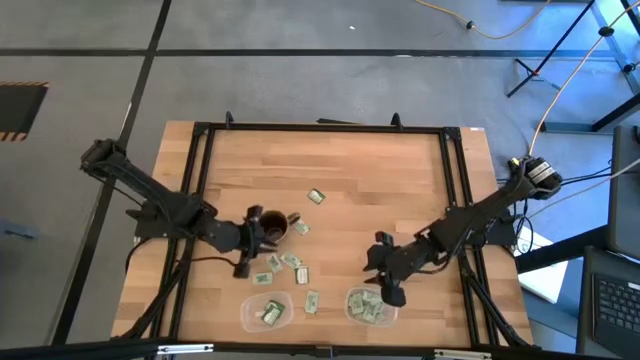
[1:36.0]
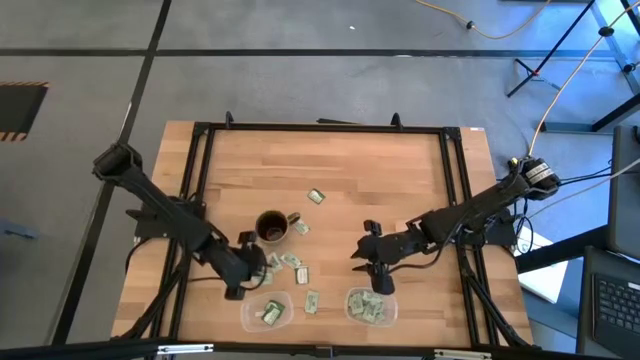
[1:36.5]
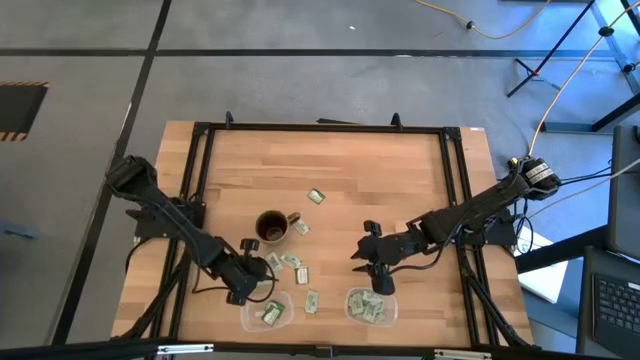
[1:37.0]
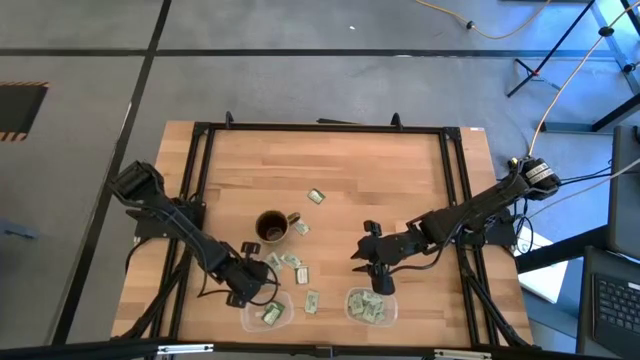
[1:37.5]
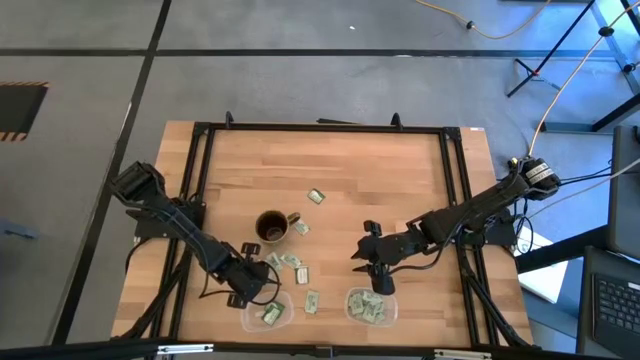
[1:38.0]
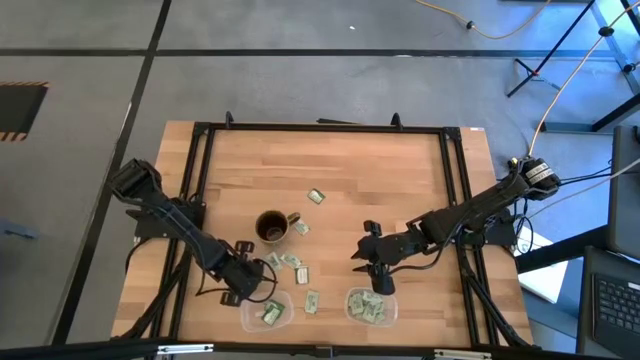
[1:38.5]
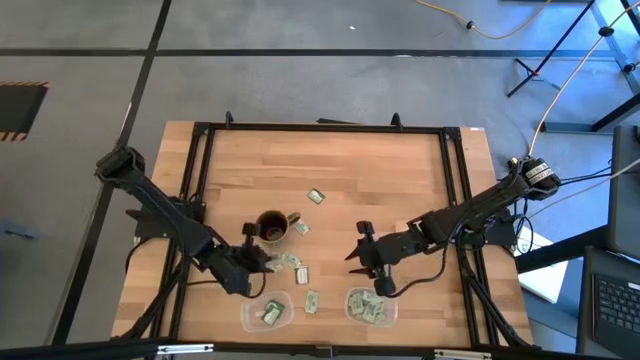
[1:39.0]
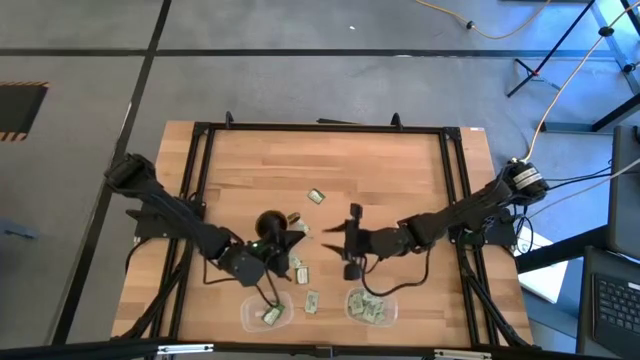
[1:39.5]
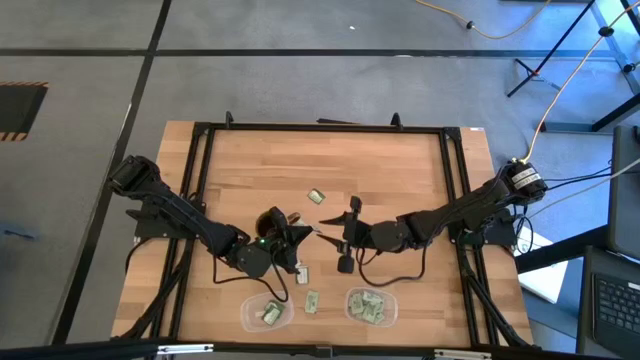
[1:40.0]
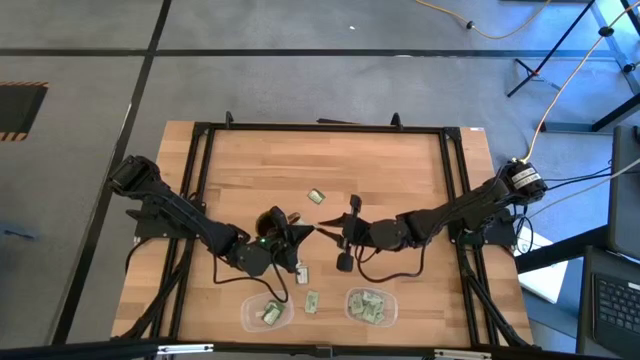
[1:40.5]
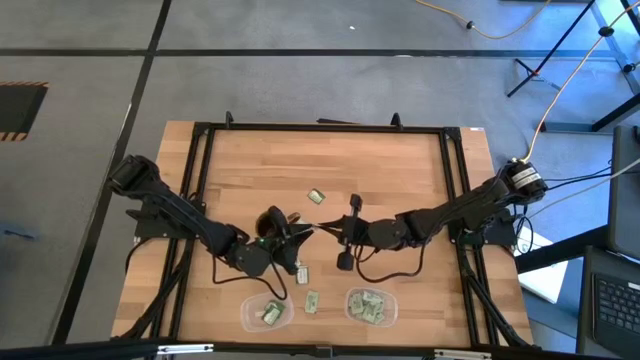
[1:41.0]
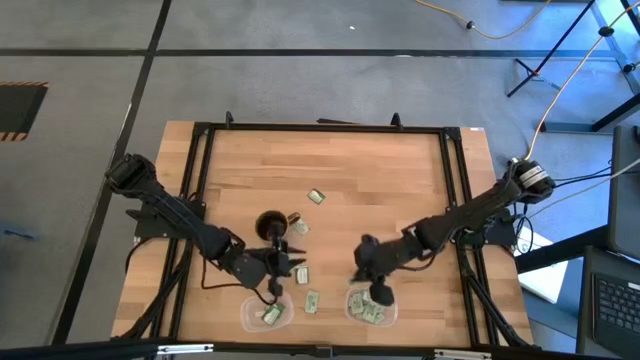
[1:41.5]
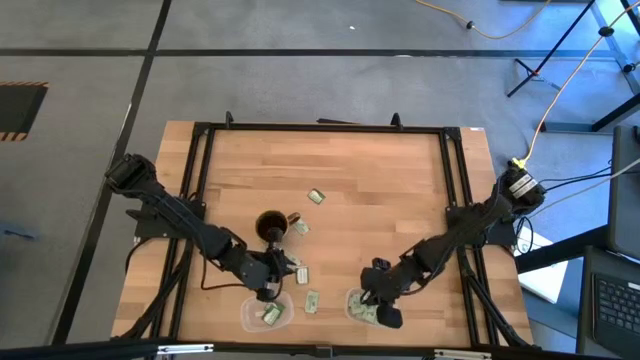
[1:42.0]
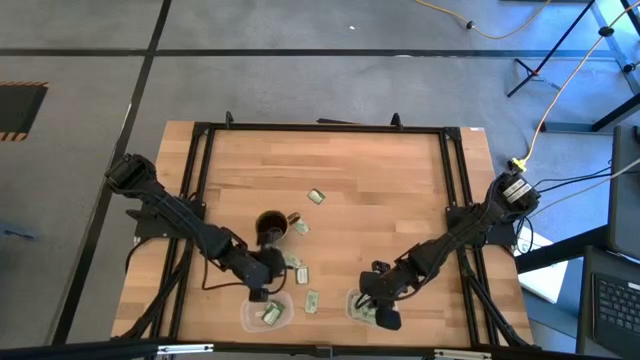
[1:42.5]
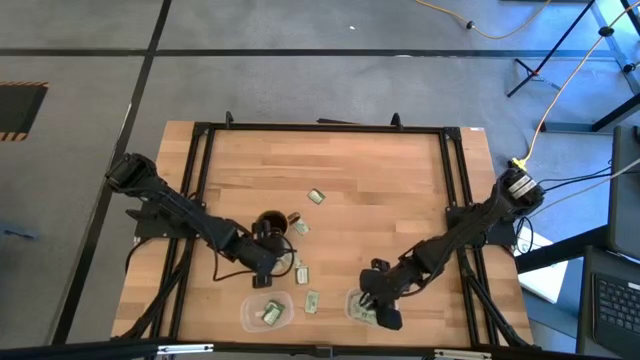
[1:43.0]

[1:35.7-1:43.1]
Task: Pick and place items into bin
Put the white stevia packet into the right transparent bin

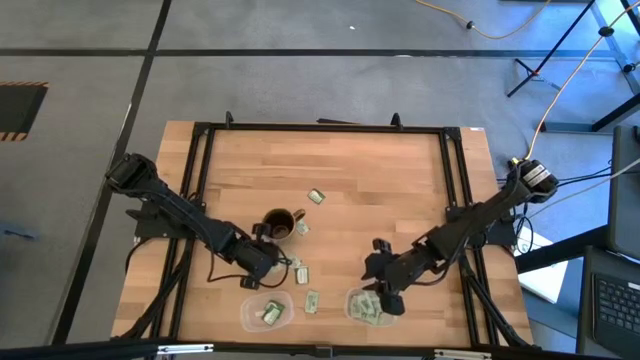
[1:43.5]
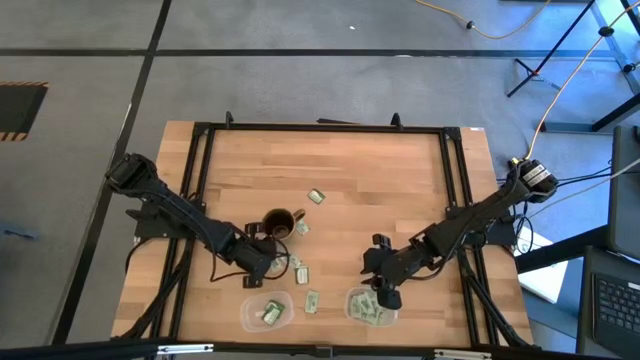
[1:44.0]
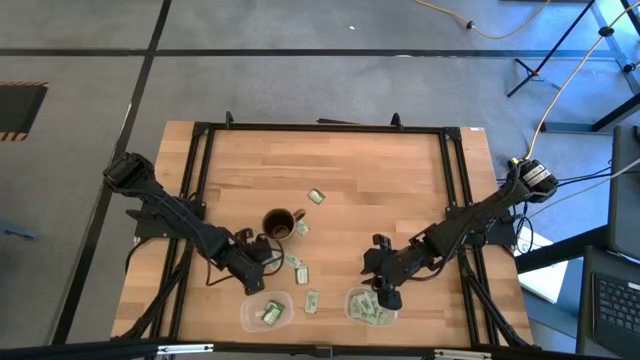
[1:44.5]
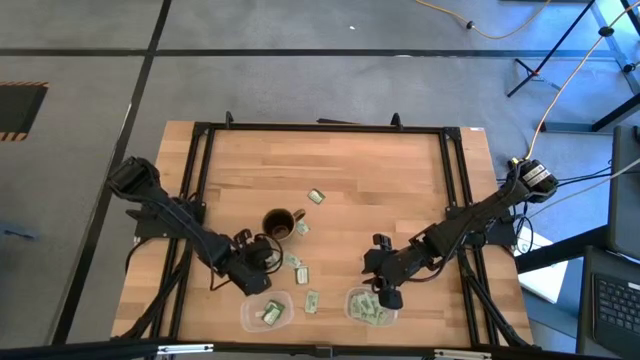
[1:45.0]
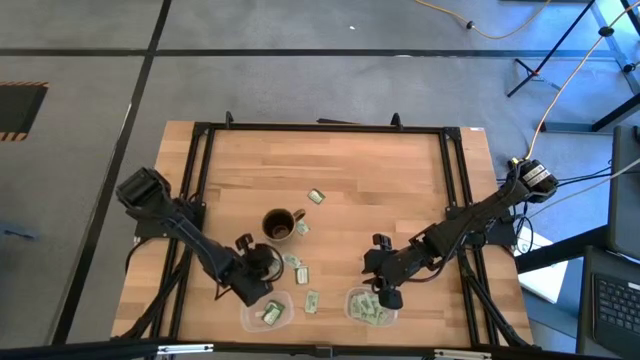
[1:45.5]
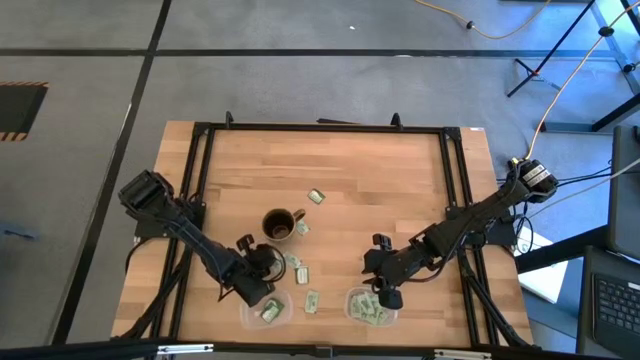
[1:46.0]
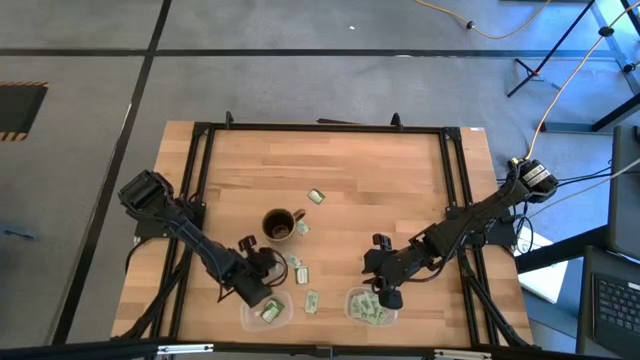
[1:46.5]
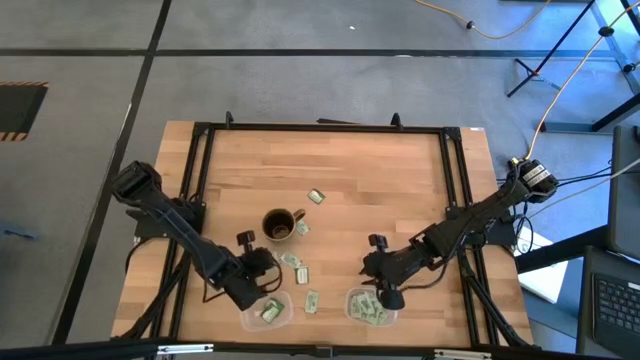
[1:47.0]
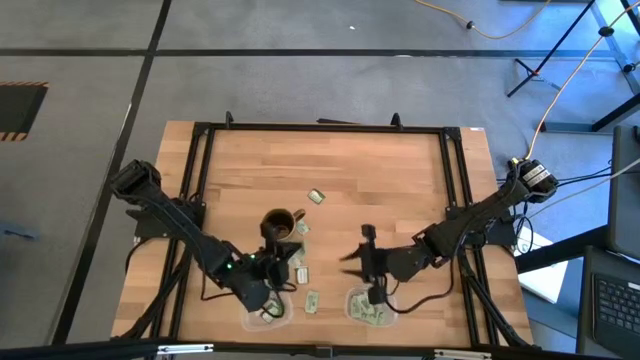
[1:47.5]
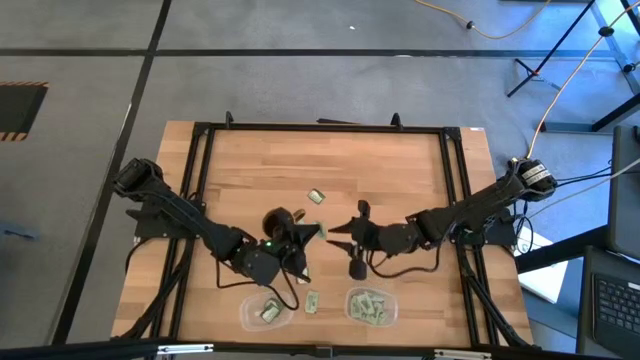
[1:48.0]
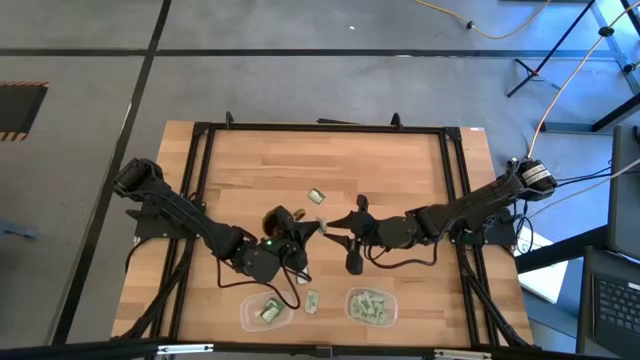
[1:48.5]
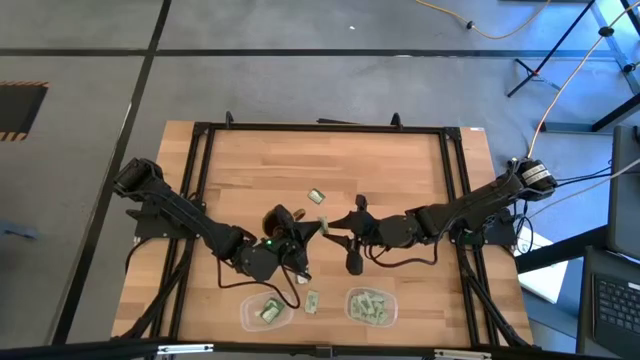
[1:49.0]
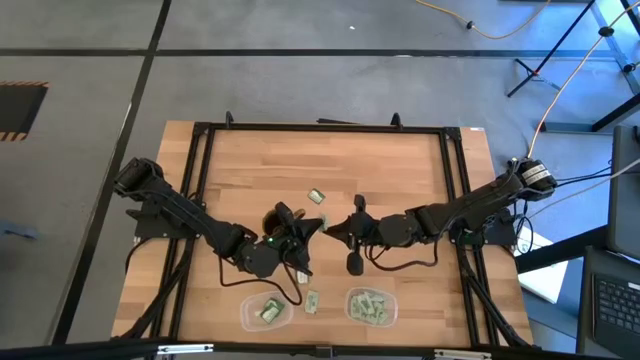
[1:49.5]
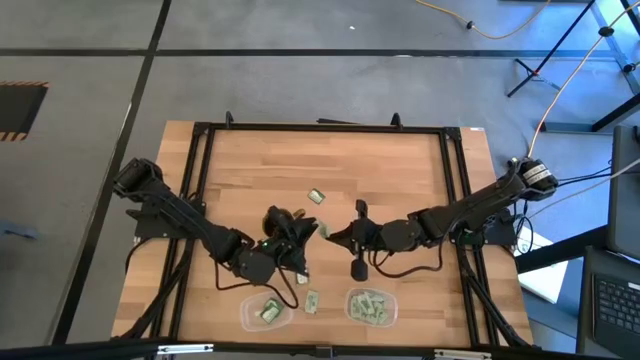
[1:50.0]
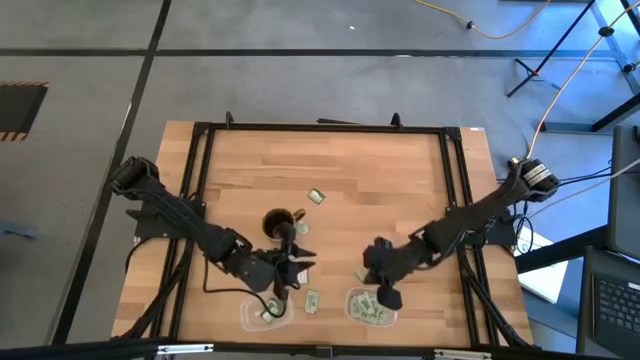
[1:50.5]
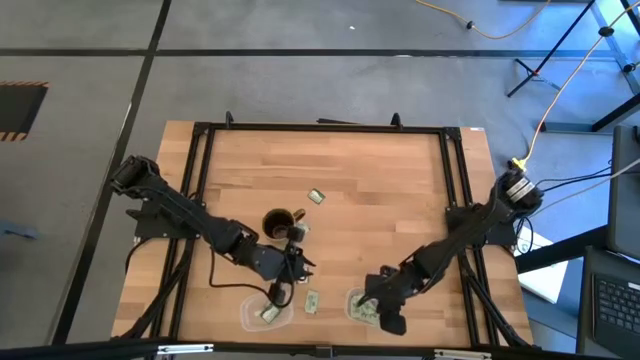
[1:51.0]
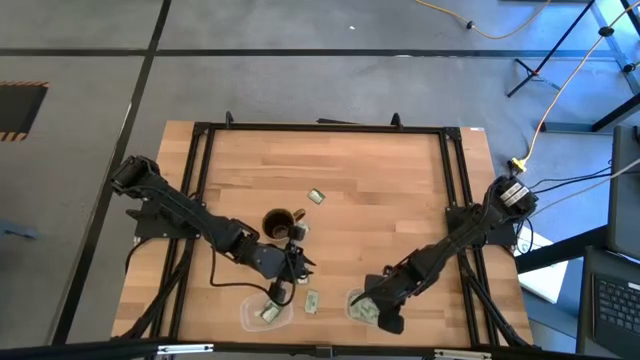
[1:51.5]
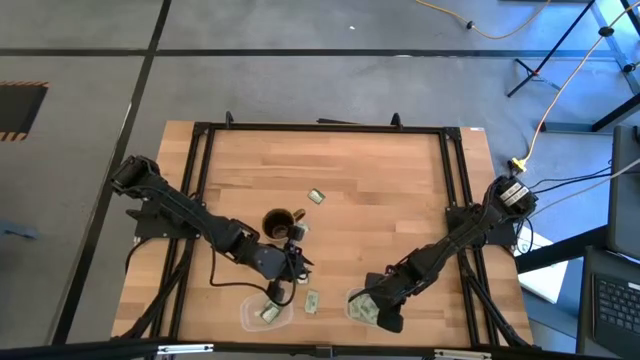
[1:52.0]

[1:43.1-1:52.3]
Put the white stevia packet into the right transparent bin

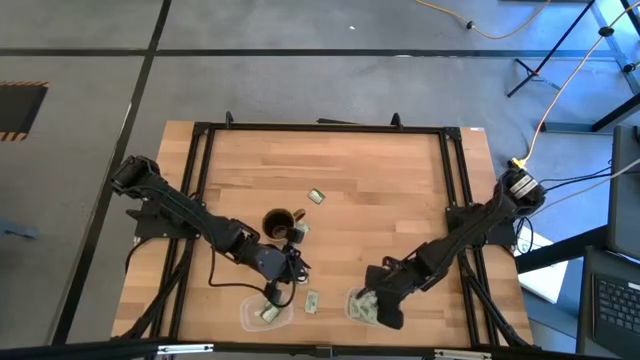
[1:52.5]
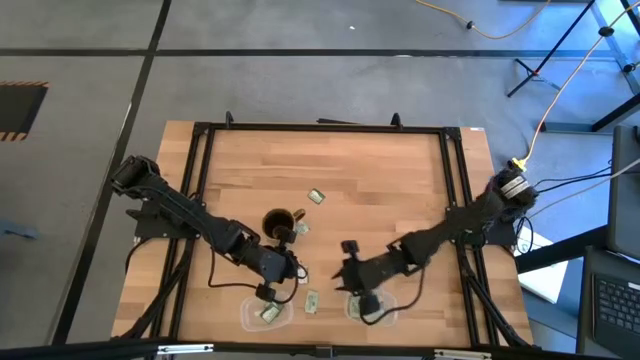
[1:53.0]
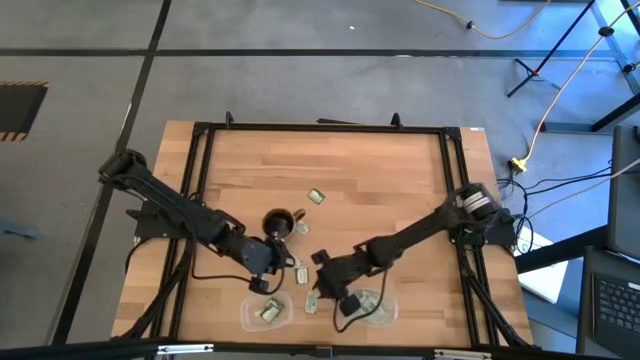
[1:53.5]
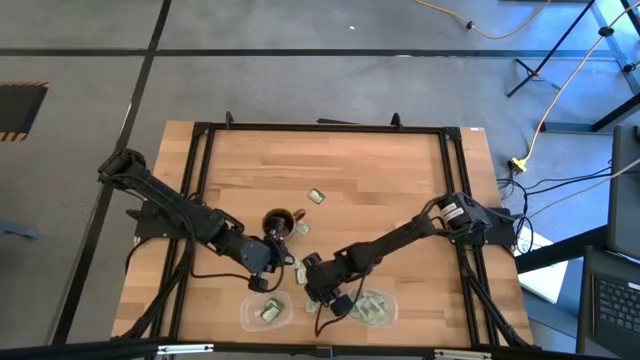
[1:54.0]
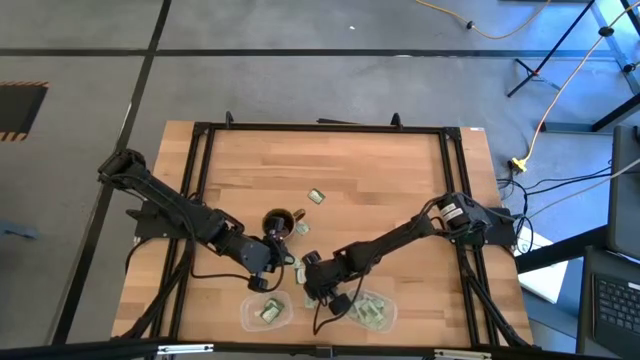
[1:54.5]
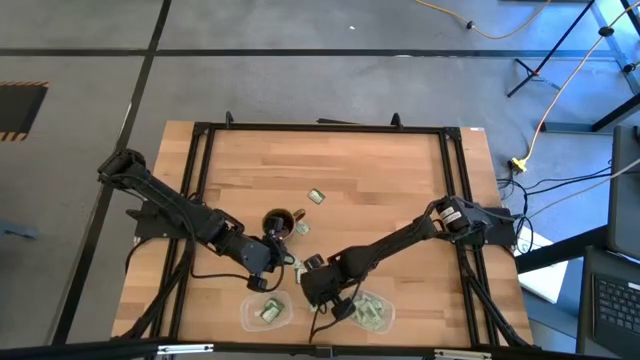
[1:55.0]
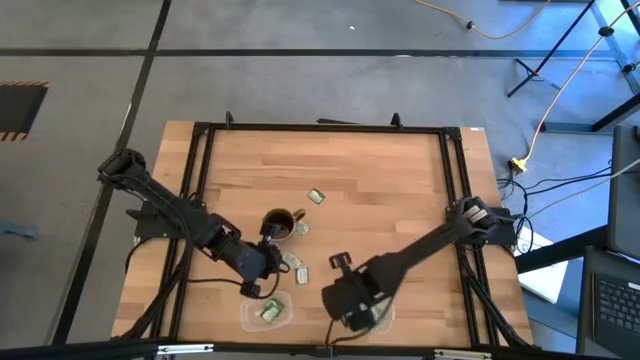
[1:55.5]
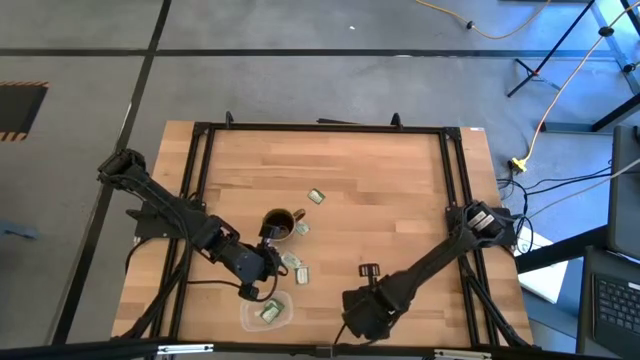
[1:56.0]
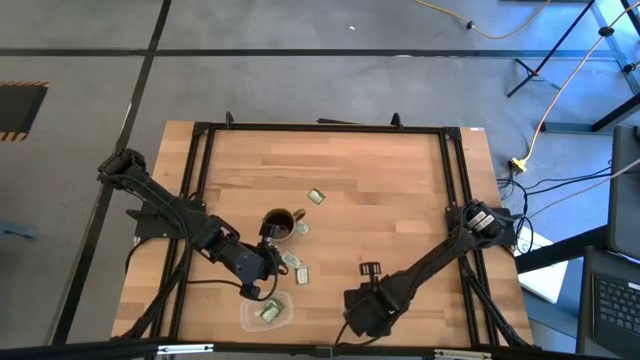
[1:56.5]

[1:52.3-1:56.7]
Put the white stevia packet into the right transparent bin

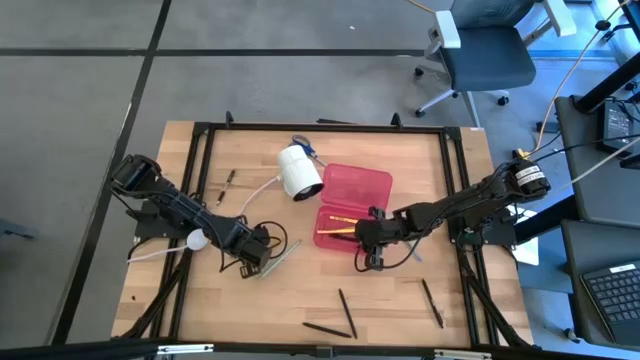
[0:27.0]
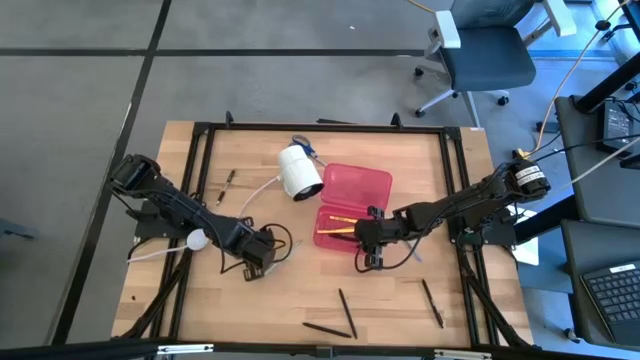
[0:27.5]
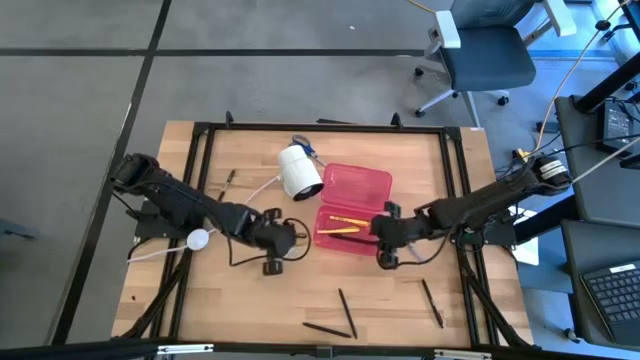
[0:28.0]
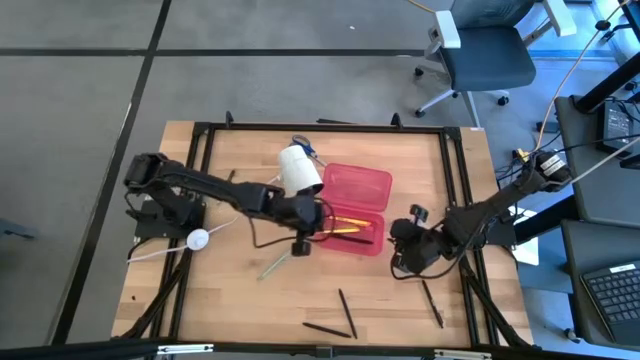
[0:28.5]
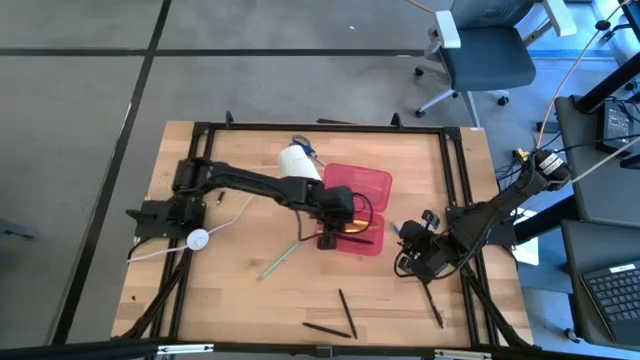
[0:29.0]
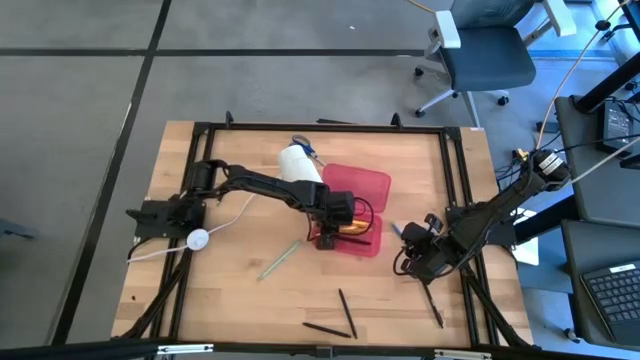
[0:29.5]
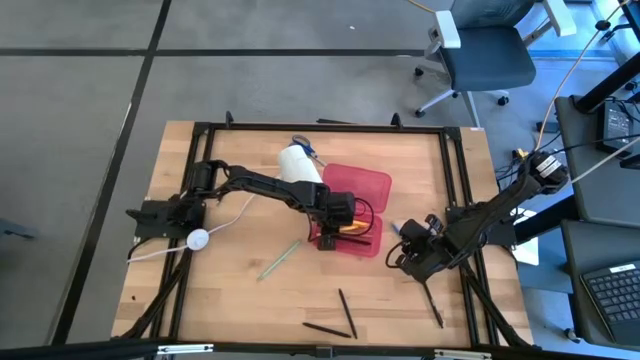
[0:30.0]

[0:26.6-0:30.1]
Task: Pick & place school supplies into a supply box
Put the yellow pencil into the pink supply box
